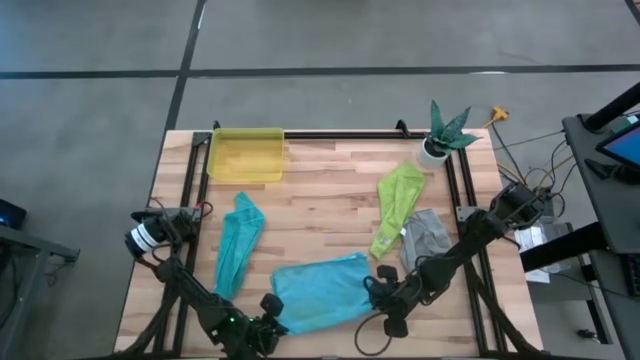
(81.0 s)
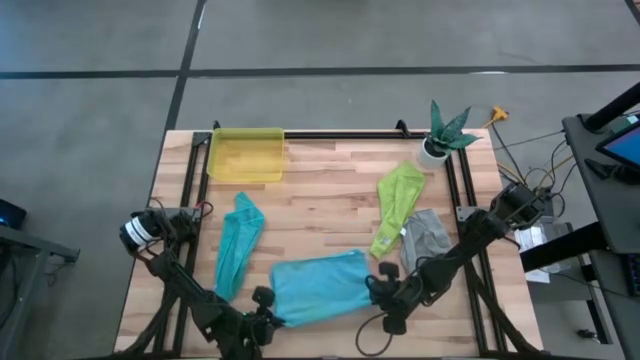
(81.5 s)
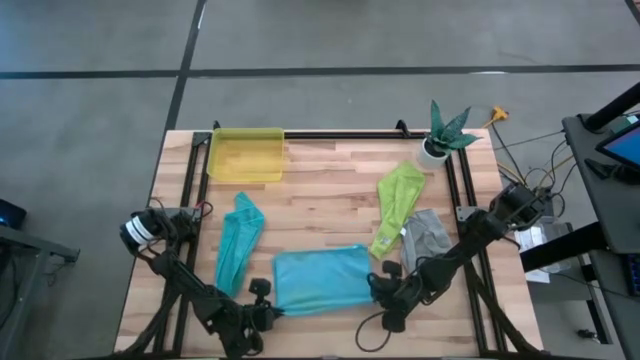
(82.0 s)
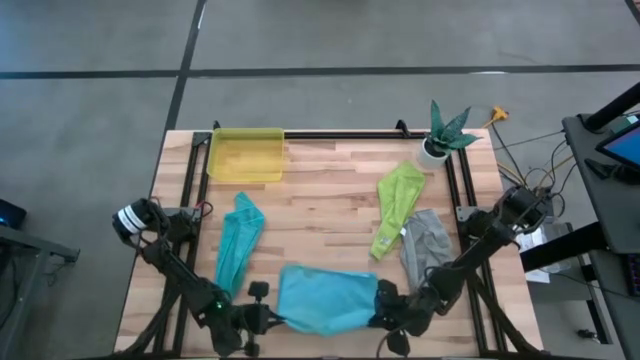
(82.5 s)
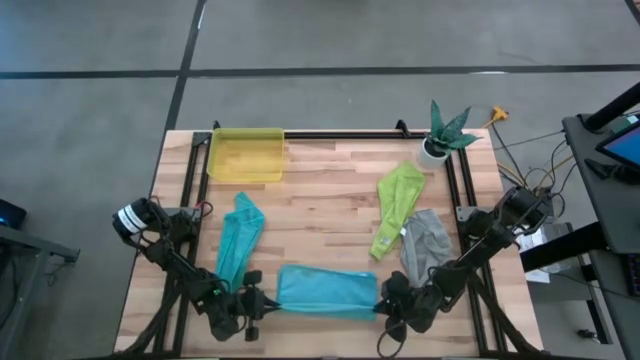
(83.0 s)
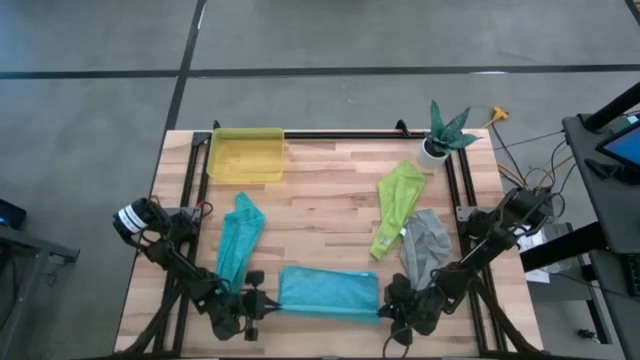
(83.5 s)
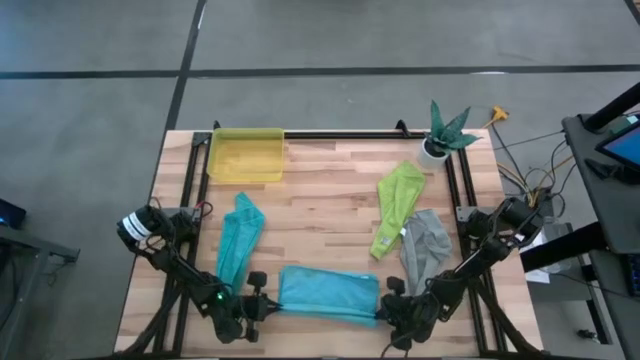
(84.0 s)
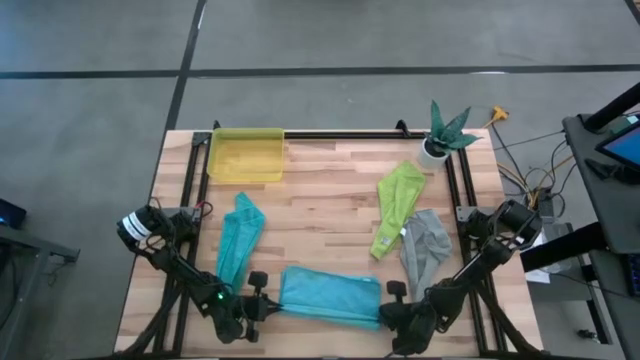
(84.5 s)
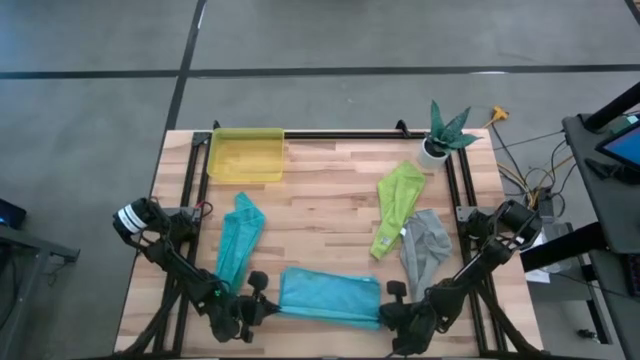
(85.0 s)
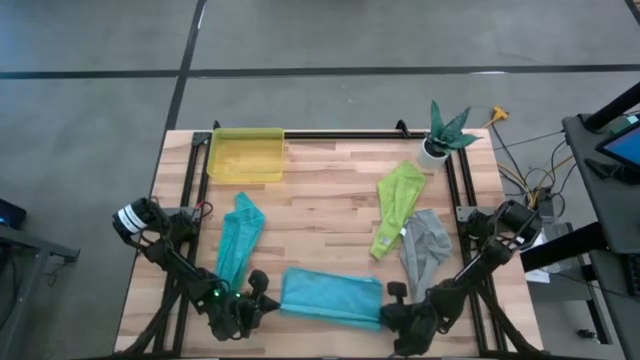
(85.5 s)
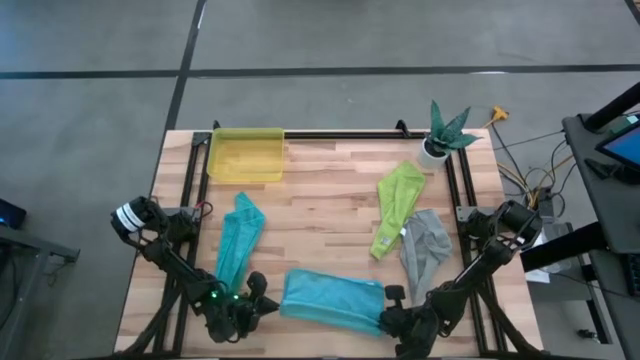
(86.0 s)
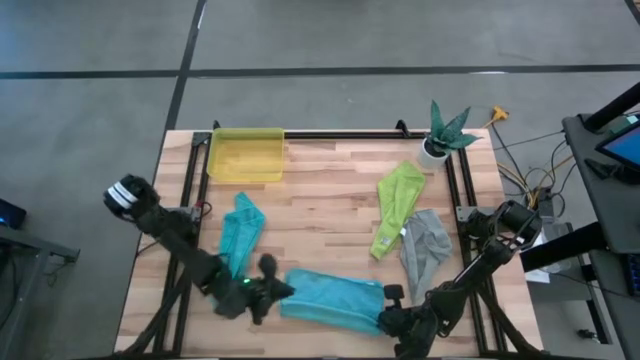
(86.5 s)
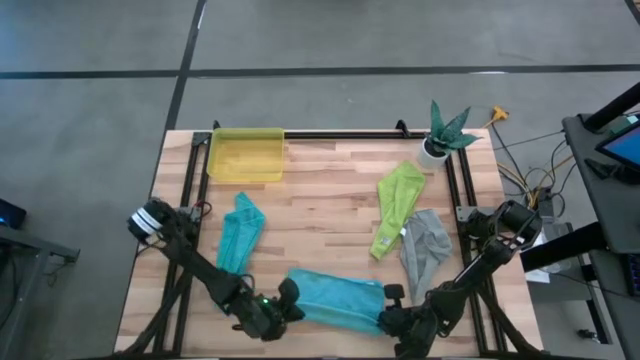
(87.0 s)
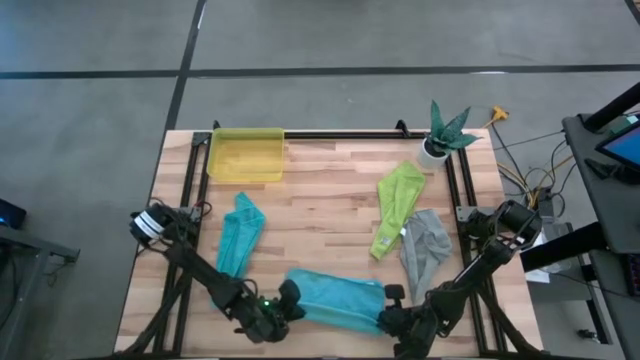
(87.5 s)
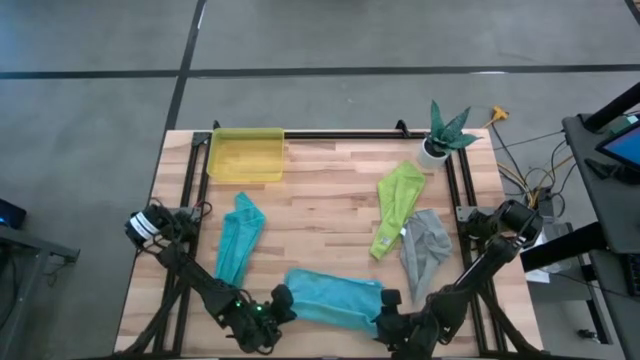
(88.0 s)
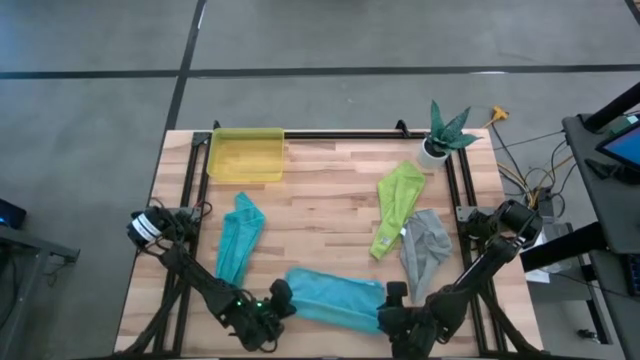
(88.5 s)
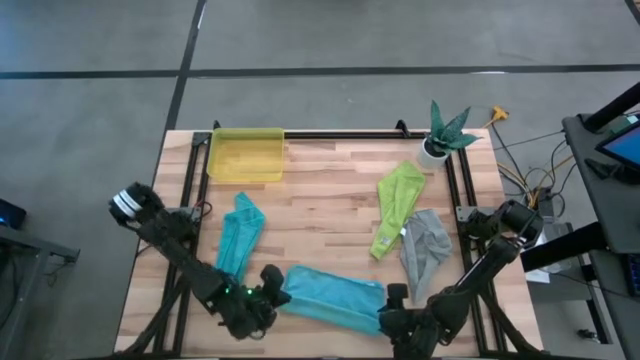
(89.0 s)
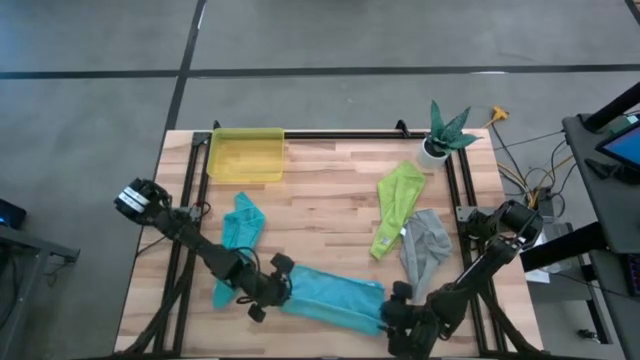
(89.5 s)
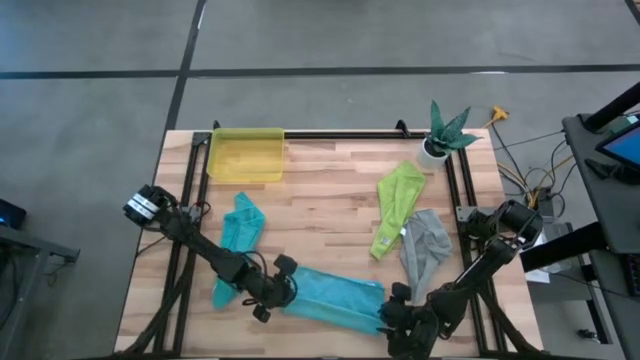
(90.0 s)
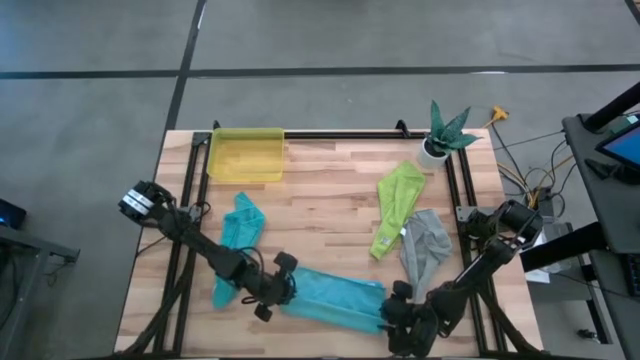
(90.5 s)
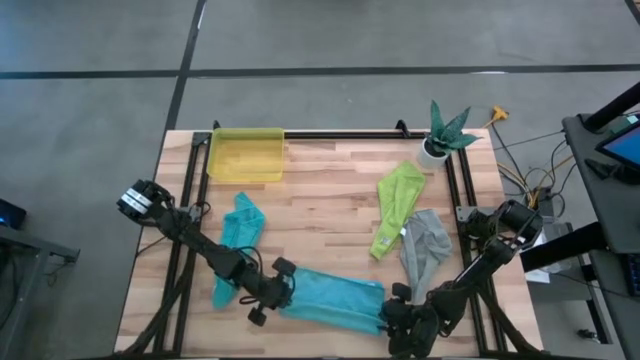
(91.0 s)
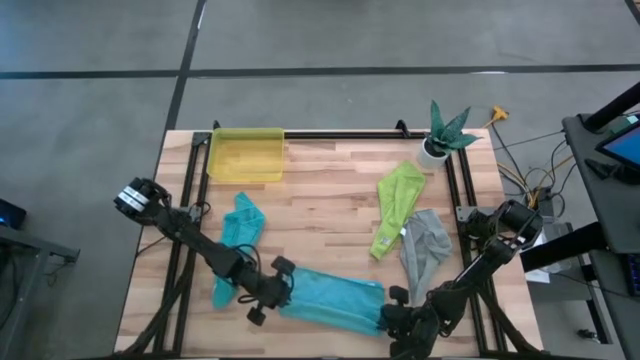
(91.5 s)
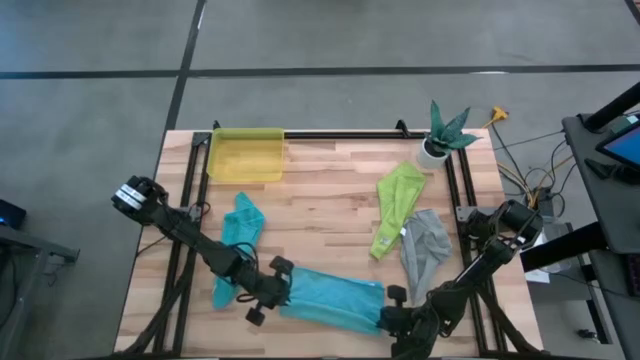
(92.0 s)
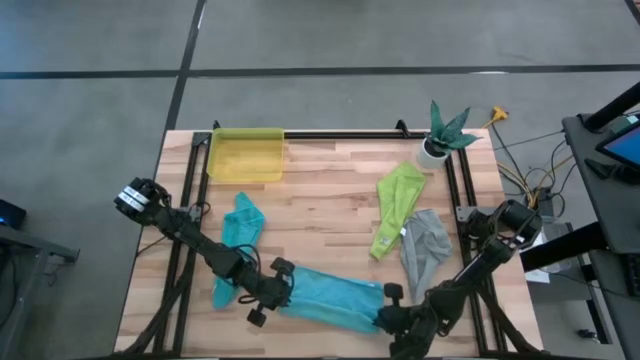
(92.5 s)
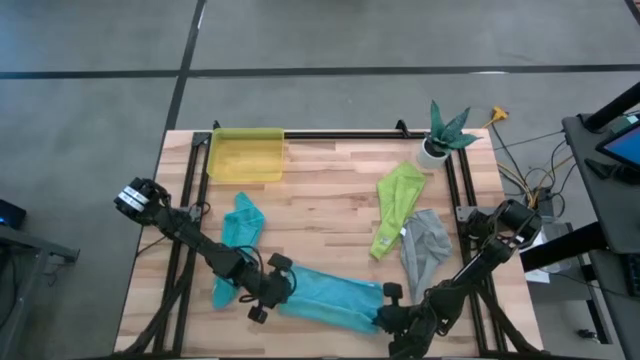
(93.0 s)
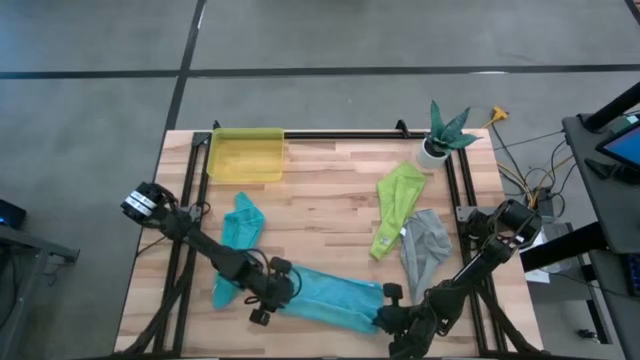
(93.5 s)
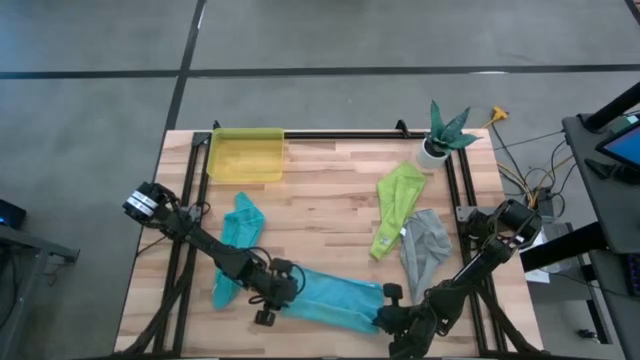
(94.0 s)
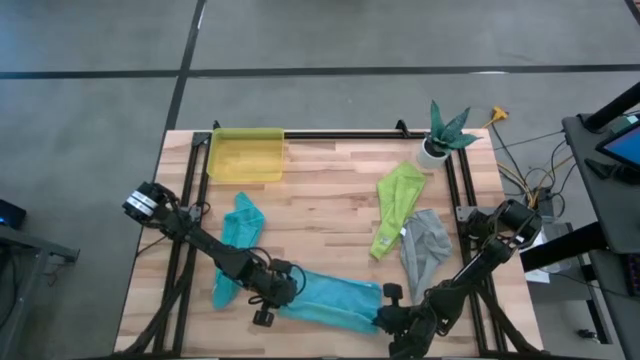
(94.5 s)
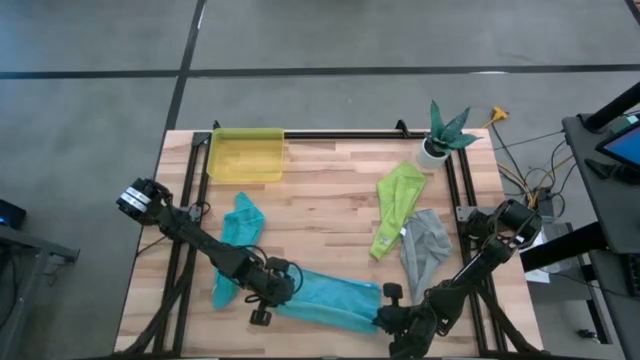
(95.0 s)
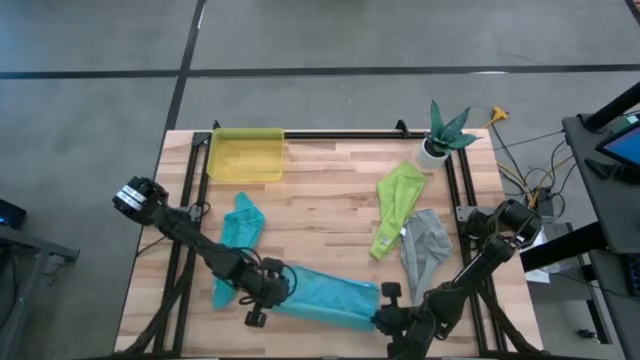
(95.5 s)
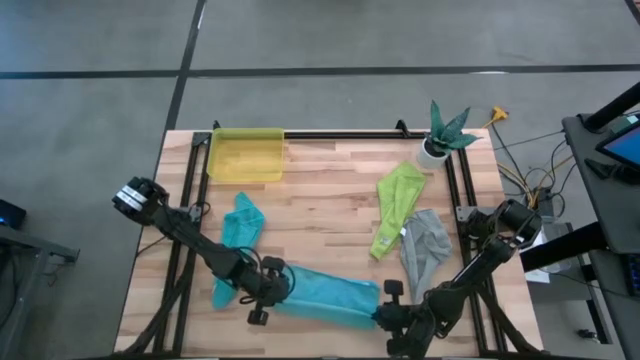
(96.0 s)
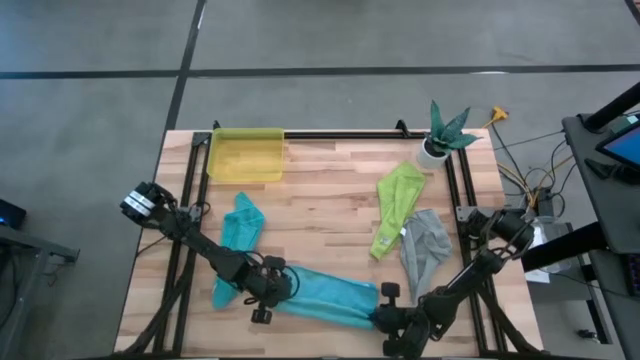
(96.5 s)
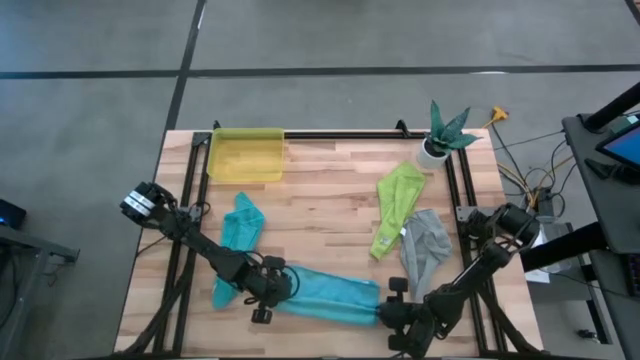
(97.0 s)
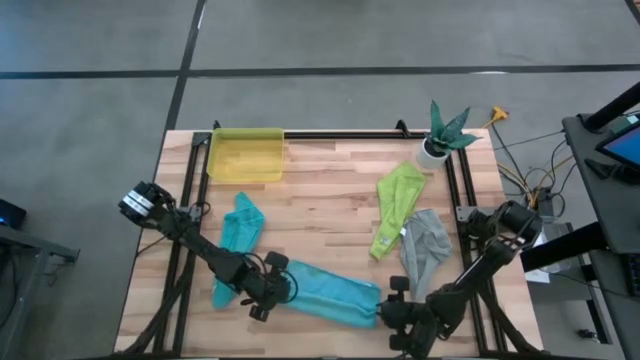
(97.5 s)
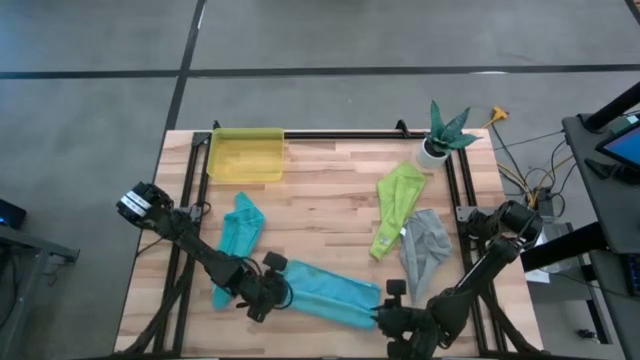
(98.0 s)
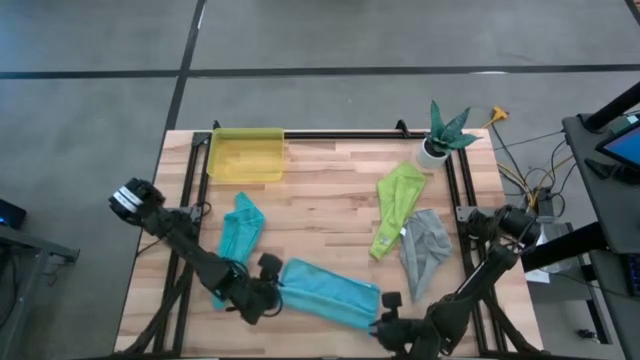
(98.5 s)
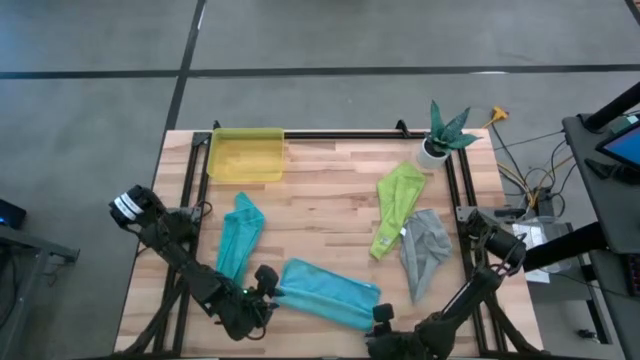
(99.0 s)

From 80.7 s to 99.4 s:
Task: Roll microfiber towels into tight, uniform cylinder then place into a basket
Roll the right light blue towel
